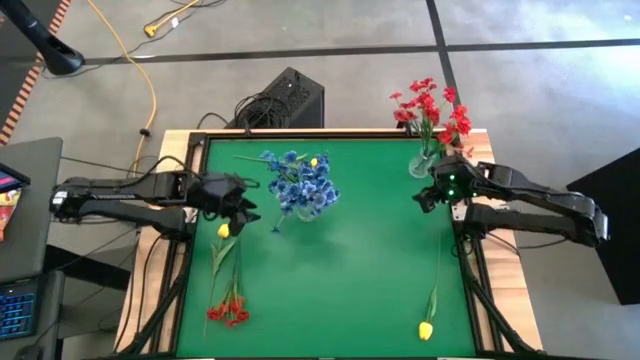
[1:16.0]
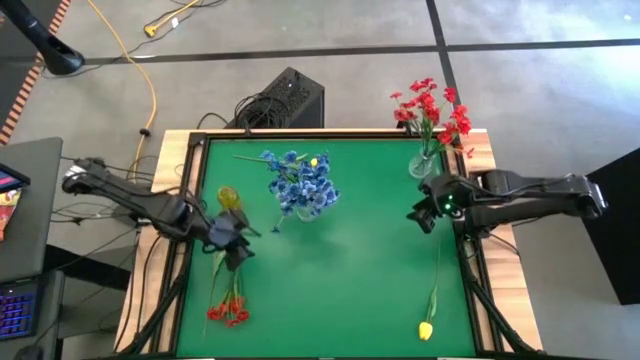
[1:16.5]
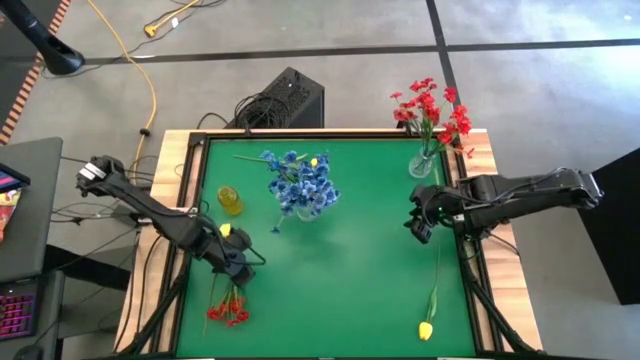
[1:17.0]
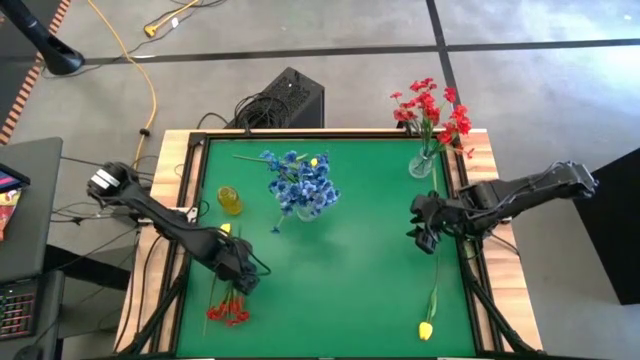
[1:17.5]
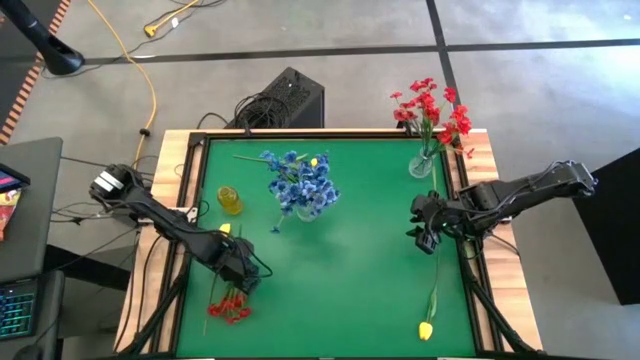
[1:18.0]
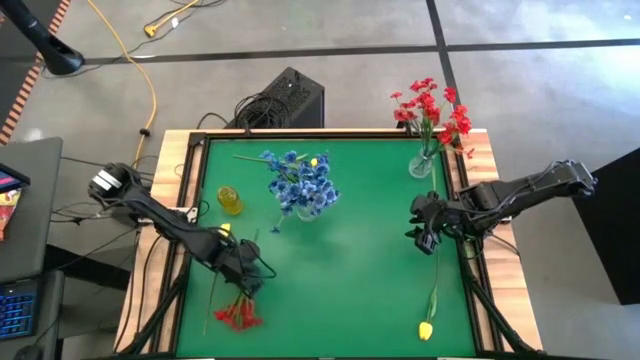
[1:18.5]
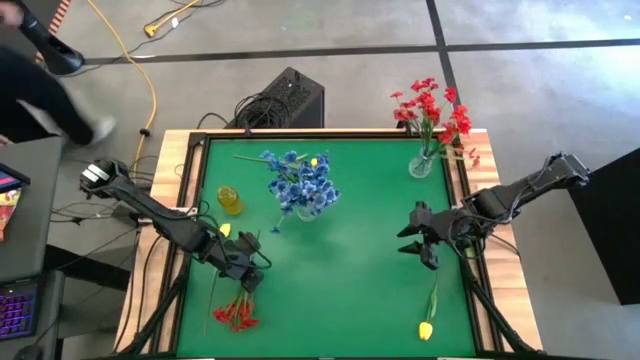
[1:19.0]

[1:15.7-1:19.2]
Task: Sort flowers into vase by color
Put the red flowers into the right transparent vase

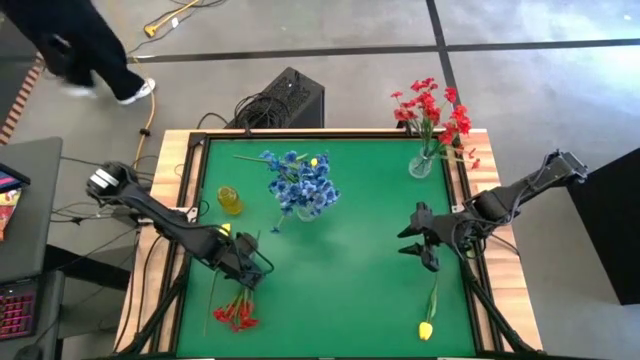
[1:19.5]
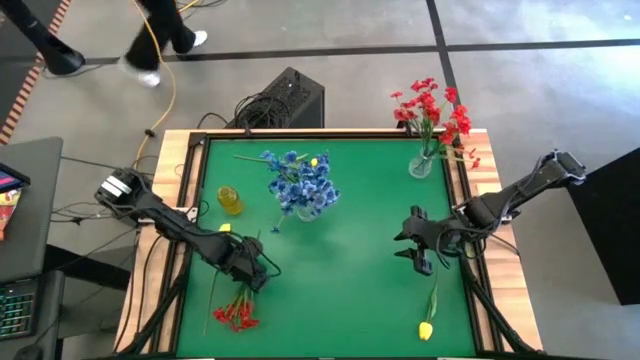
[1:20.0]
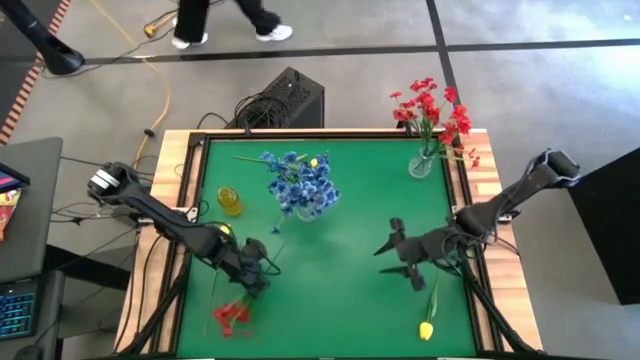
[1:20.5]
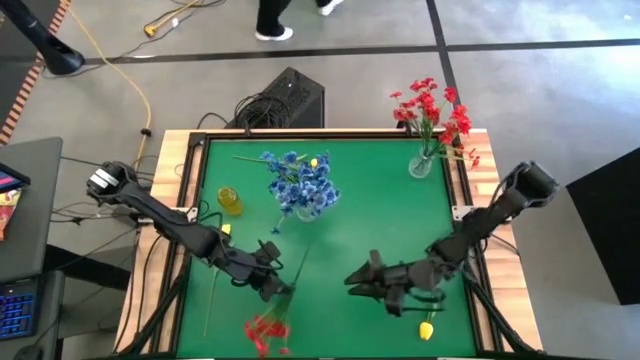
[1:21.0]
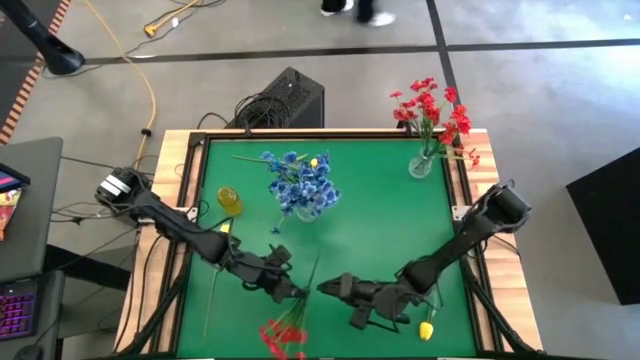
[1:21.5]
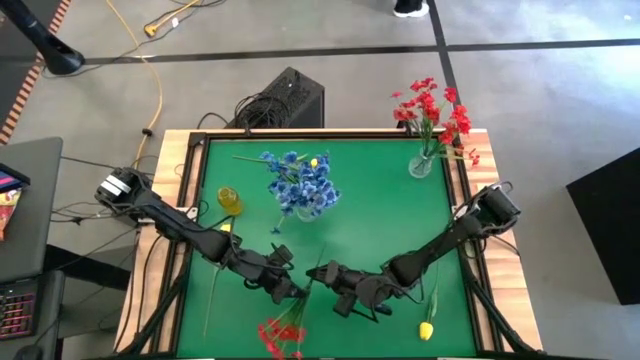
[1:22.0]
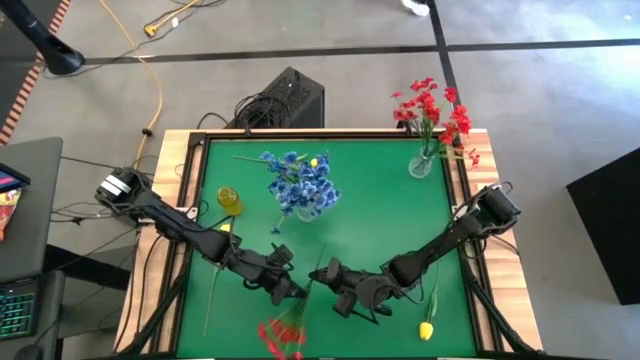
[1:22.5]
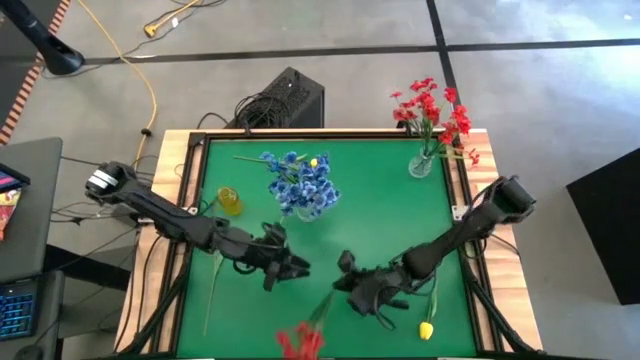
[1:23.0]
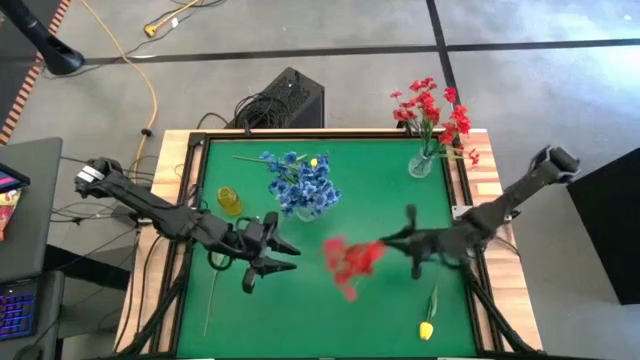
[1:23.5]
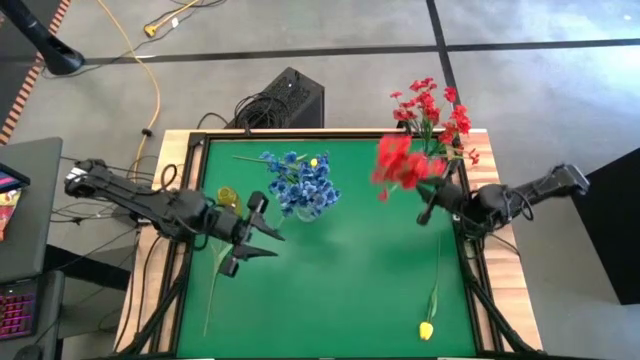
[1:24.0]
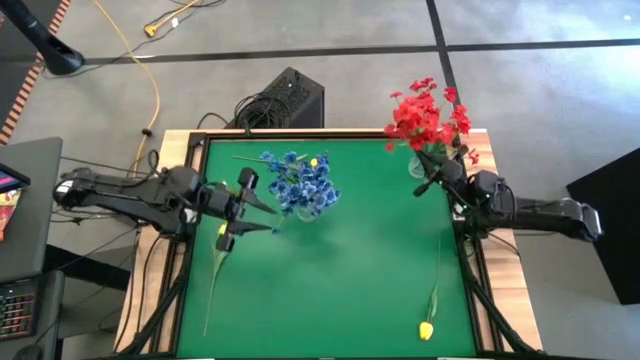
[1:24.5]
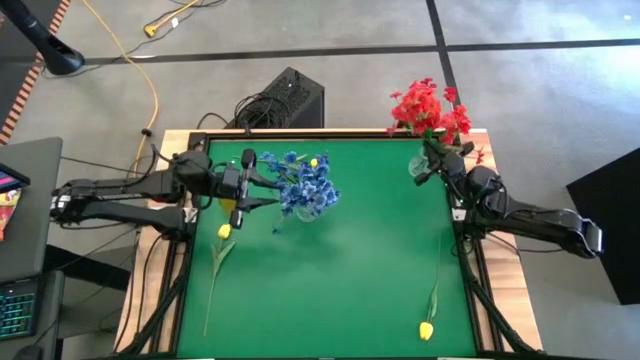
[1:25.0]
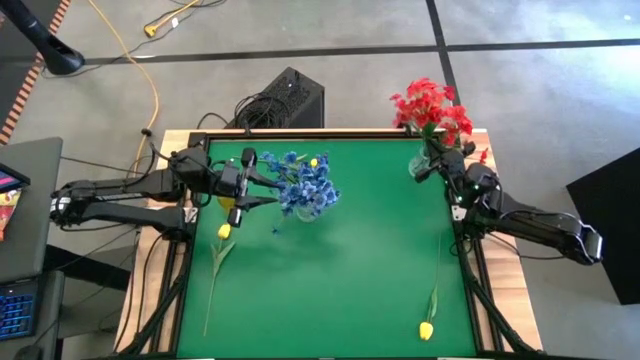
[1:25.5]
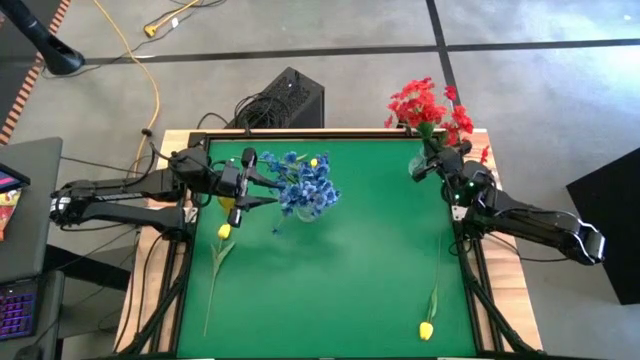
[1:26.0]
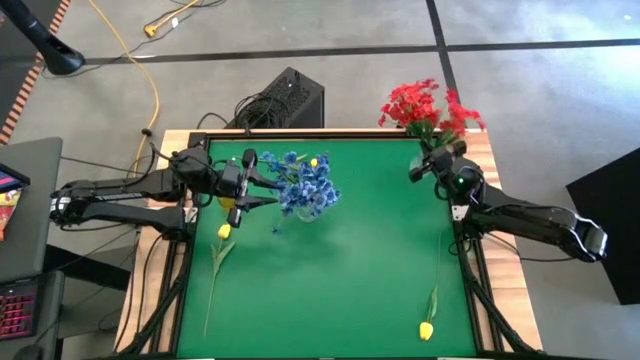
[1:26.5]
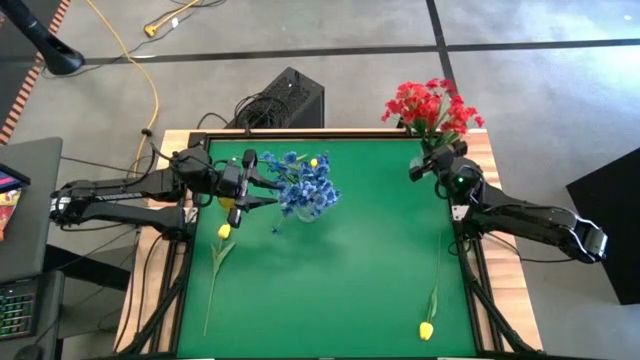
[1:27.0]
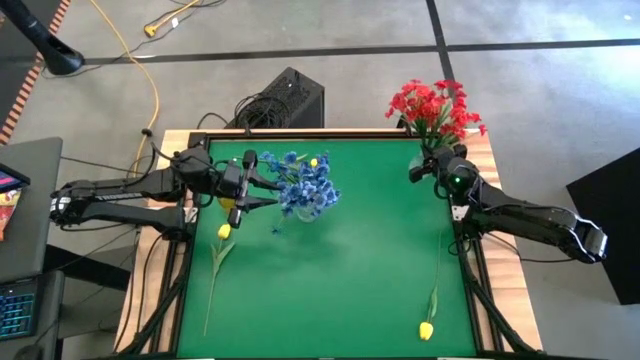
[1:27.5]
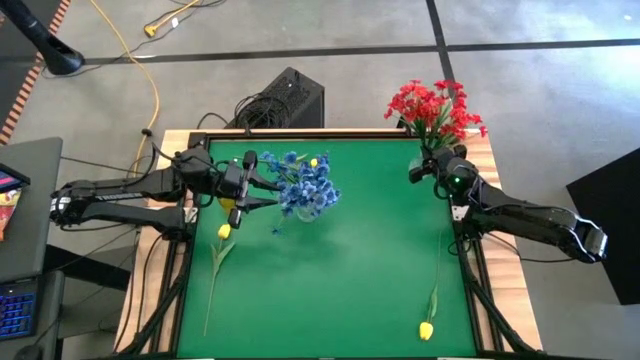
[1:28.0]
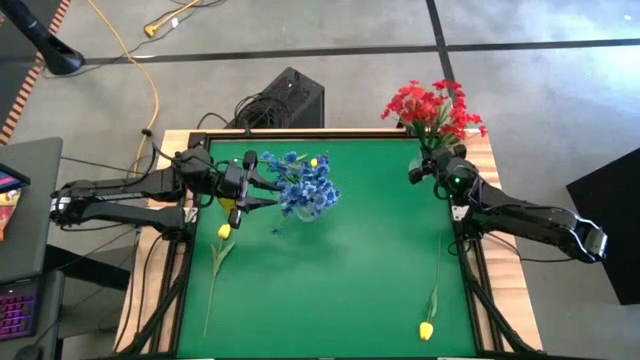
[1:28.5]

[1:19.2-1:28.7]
Put the red flowers into the right transparent vase

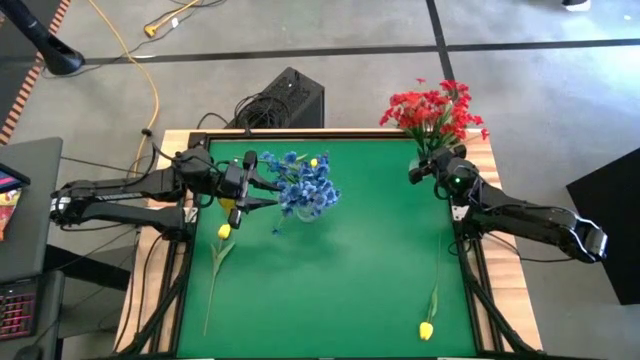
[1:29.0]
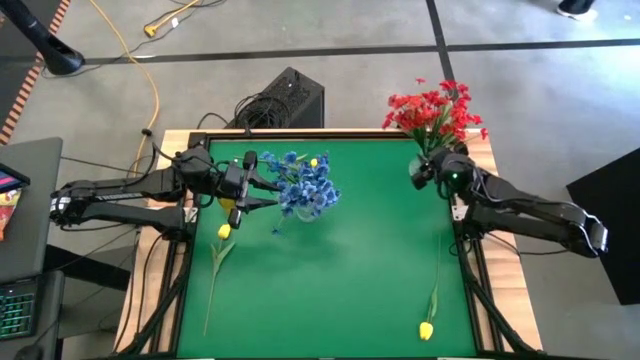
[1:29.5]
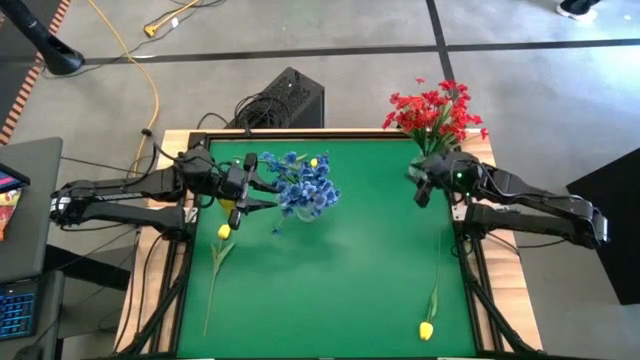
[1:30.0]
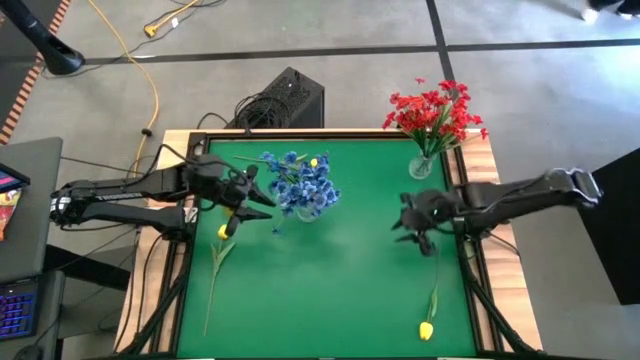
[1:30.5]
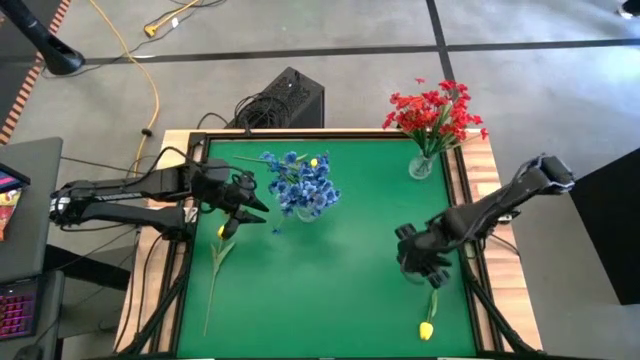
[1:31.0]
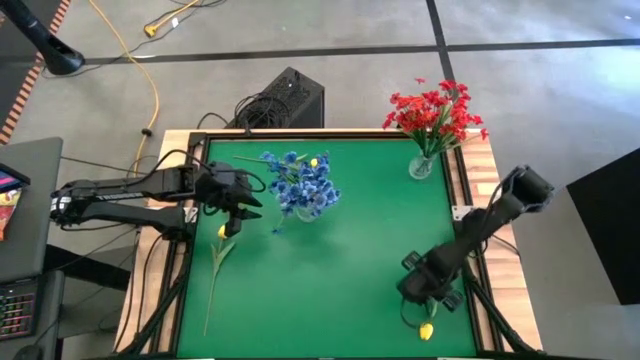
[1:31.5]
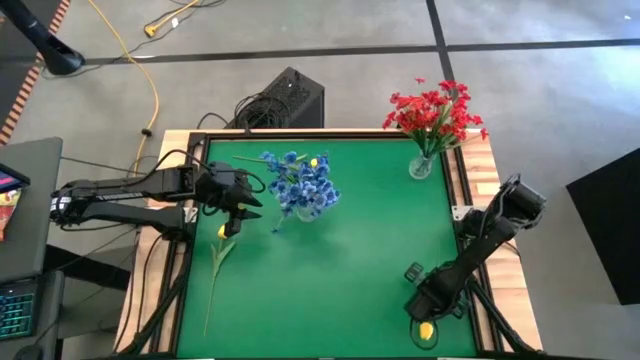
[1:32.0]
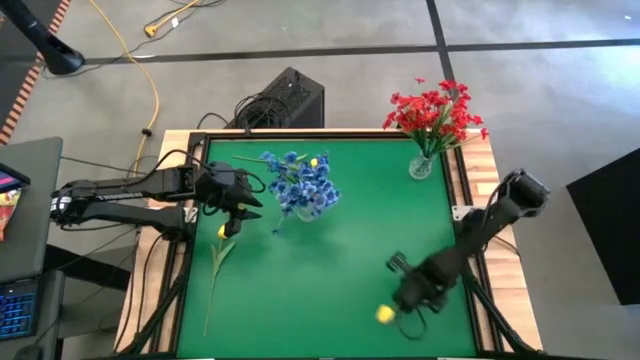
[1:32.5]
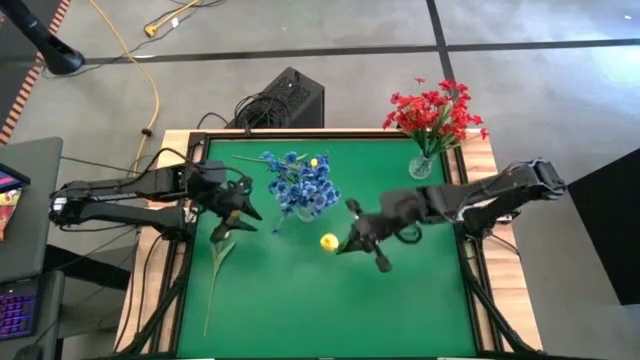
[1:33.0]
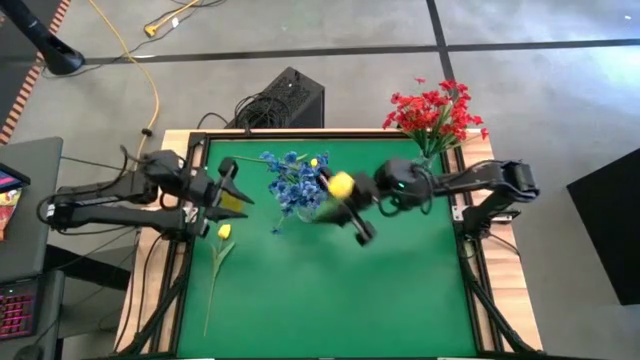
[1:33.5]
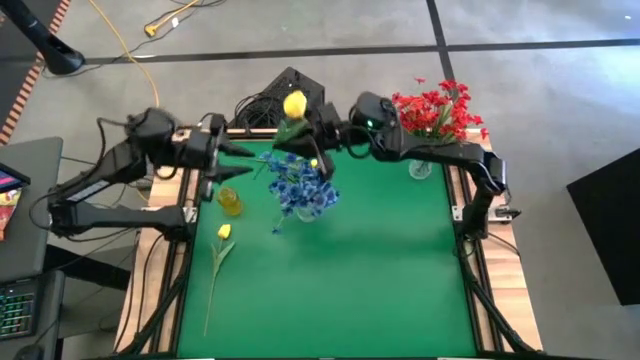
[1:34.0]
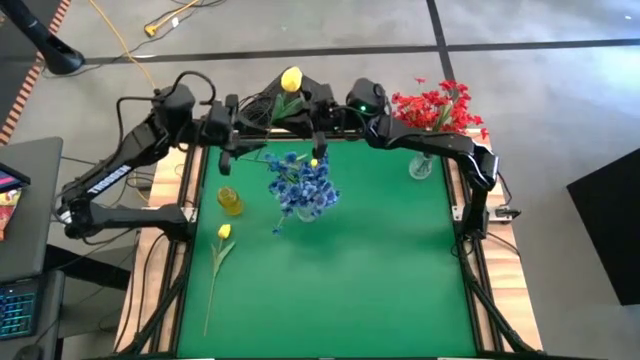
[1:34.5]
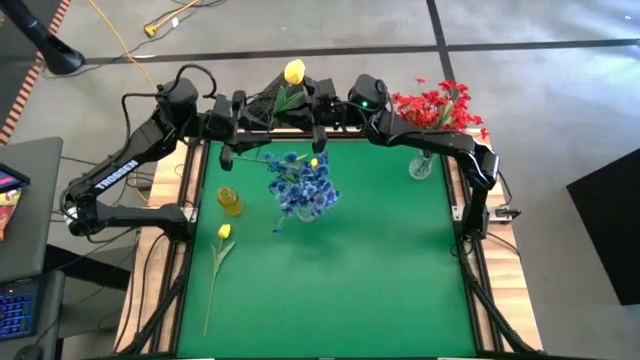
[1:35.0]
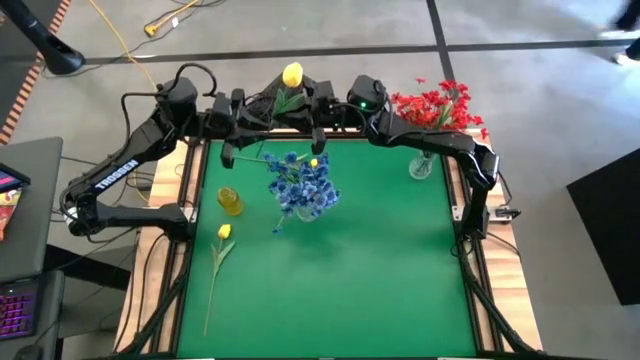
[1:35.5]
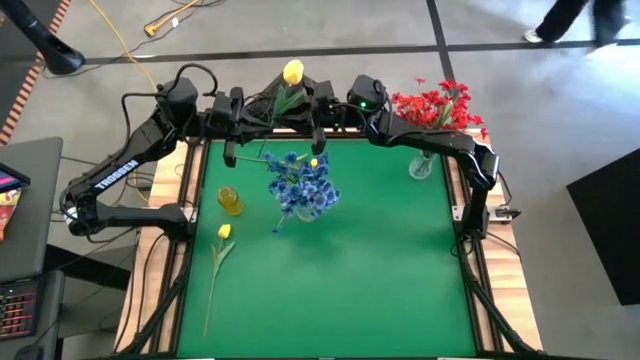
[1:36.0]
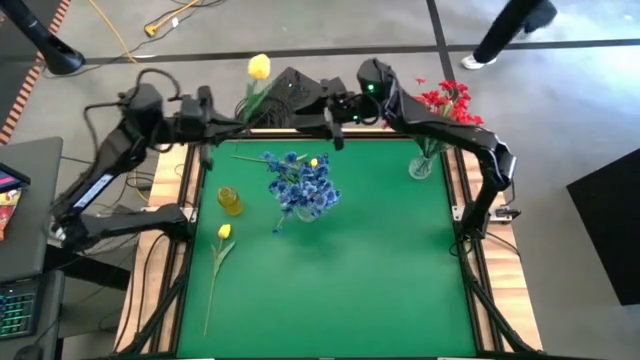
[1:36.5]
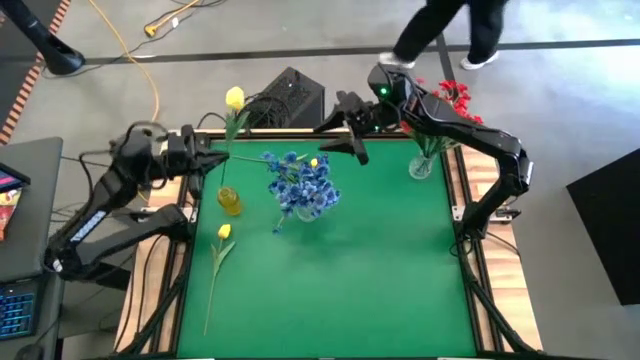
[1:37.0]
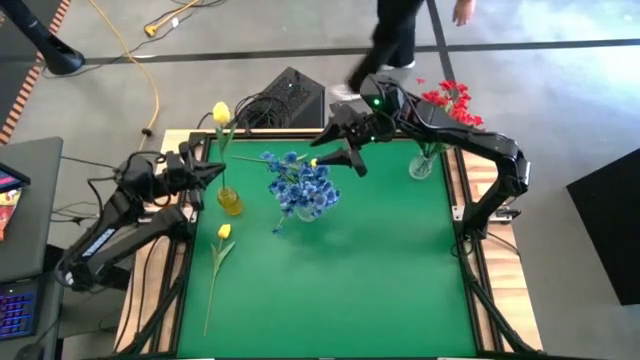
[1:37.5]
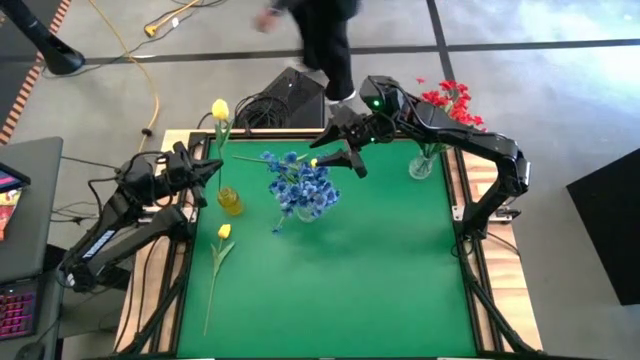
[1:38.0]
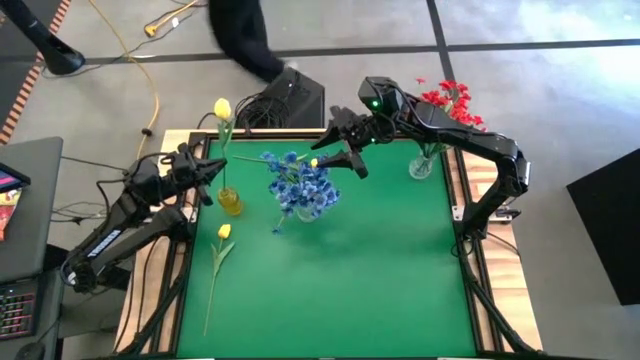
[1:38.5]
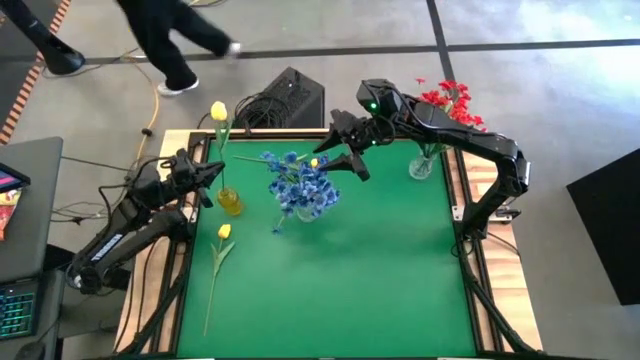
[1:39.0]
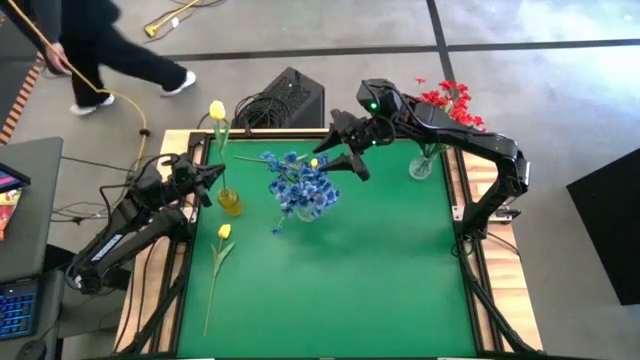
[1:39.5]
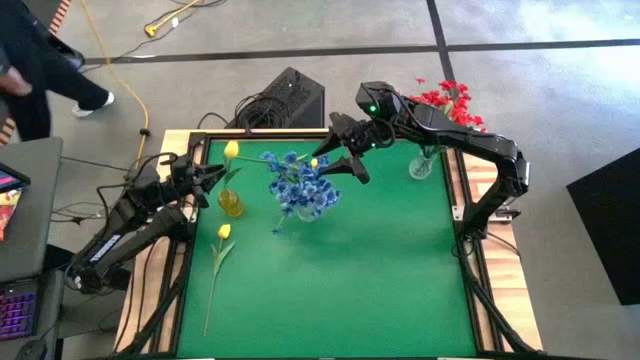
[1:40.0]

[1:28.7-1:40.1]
Put the bottom right yellow tulip into the yellow vase
